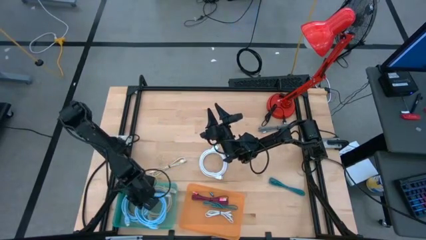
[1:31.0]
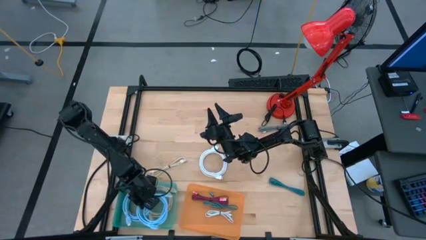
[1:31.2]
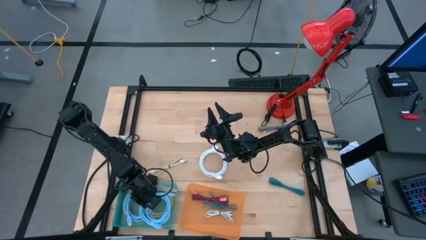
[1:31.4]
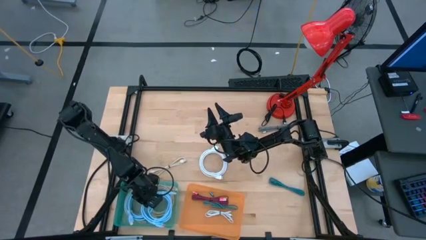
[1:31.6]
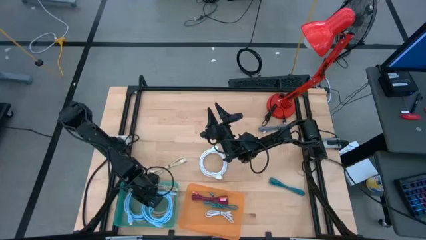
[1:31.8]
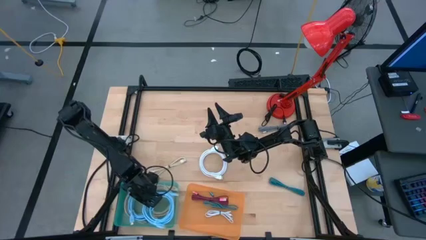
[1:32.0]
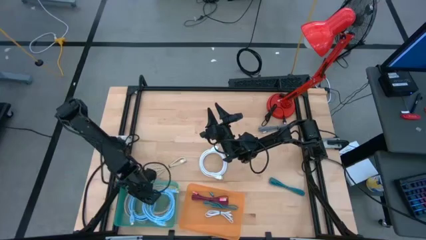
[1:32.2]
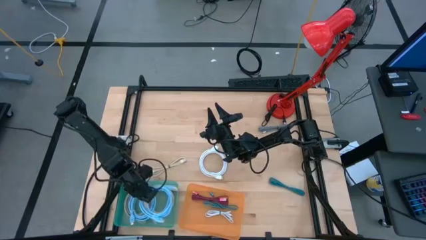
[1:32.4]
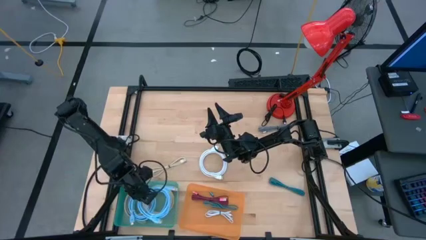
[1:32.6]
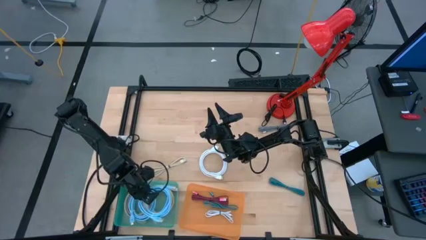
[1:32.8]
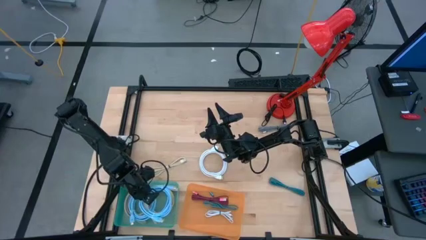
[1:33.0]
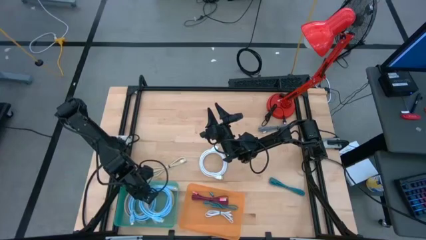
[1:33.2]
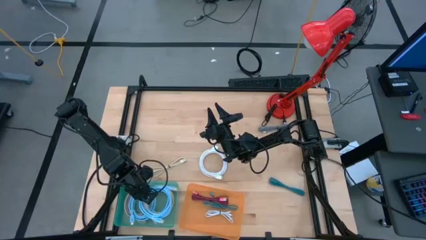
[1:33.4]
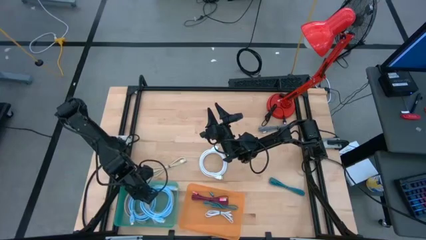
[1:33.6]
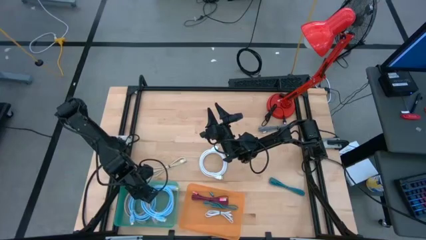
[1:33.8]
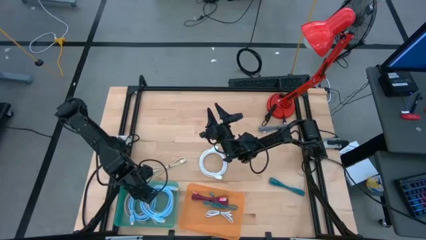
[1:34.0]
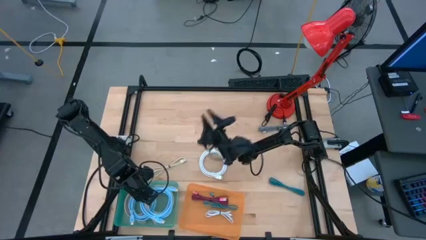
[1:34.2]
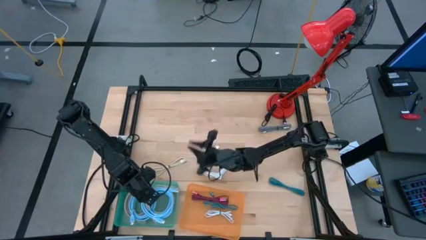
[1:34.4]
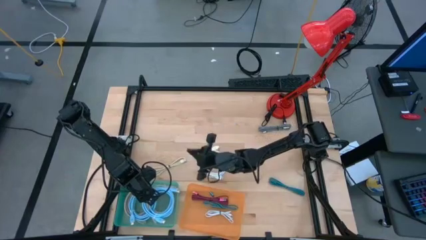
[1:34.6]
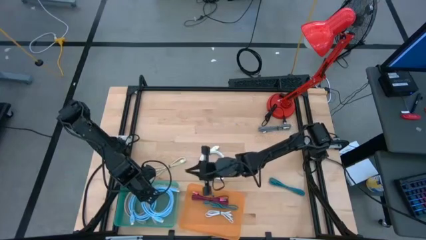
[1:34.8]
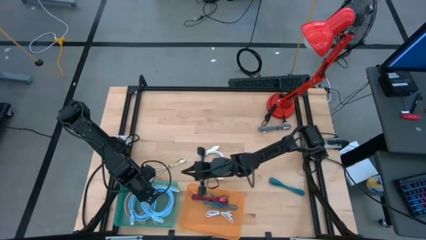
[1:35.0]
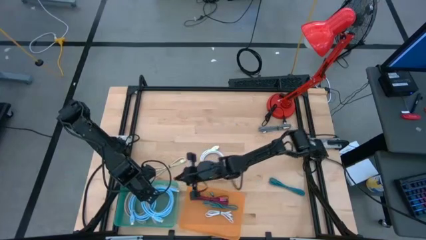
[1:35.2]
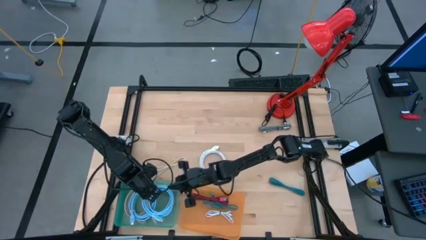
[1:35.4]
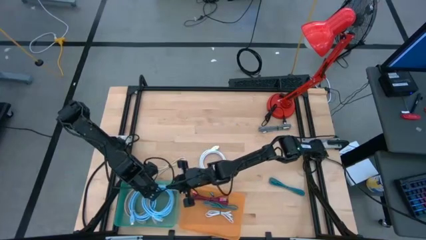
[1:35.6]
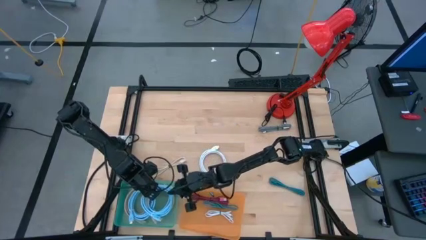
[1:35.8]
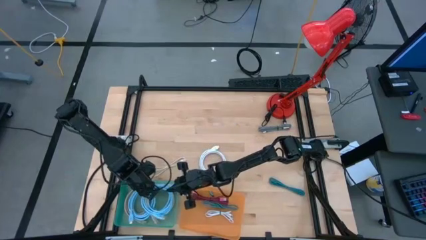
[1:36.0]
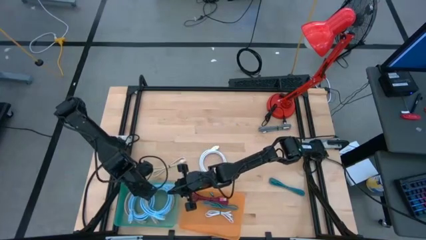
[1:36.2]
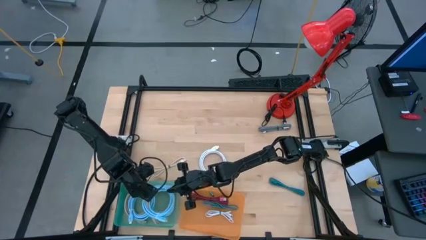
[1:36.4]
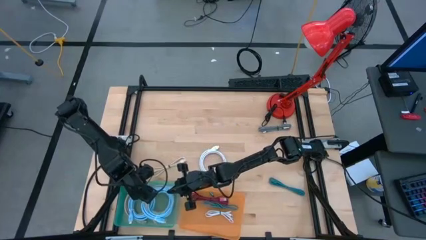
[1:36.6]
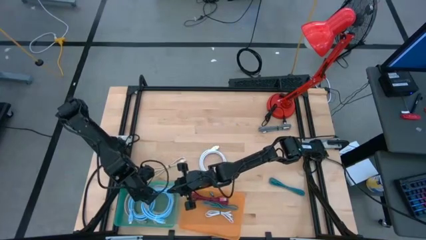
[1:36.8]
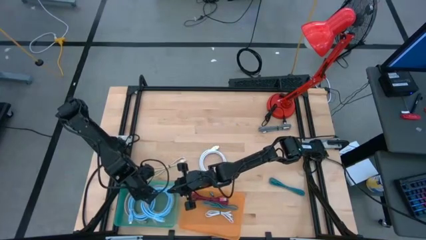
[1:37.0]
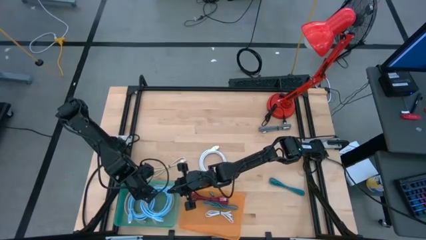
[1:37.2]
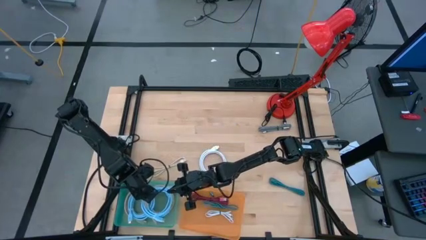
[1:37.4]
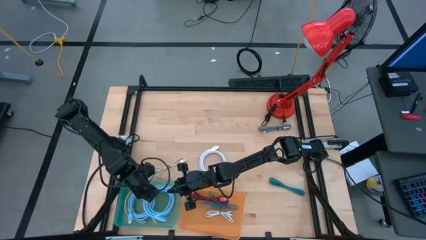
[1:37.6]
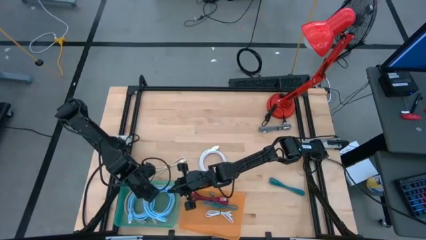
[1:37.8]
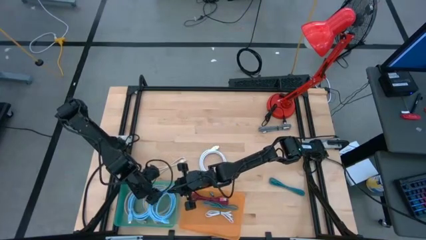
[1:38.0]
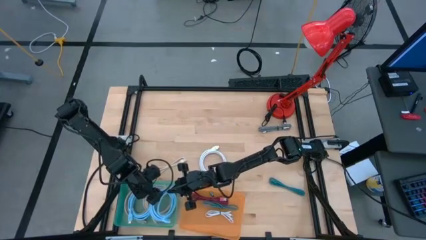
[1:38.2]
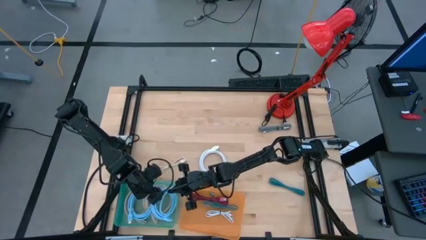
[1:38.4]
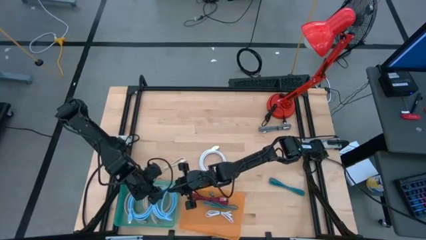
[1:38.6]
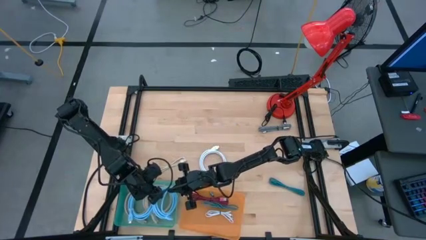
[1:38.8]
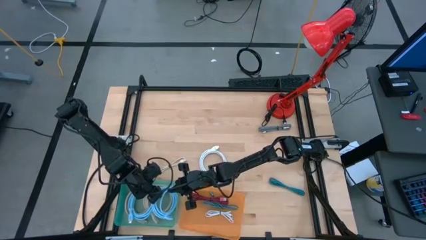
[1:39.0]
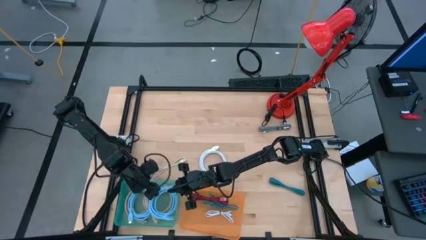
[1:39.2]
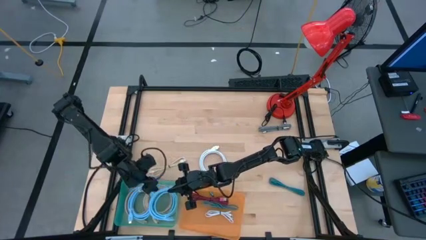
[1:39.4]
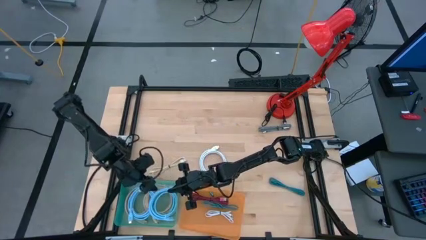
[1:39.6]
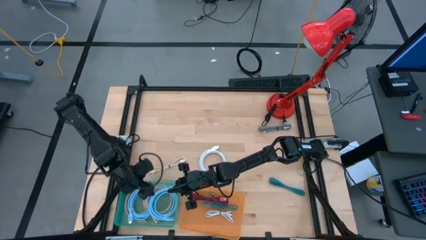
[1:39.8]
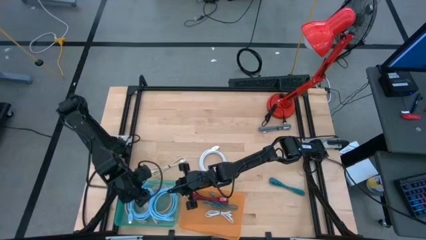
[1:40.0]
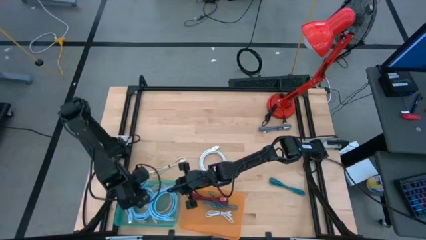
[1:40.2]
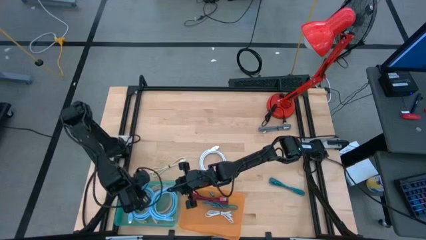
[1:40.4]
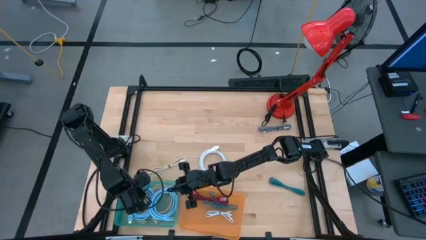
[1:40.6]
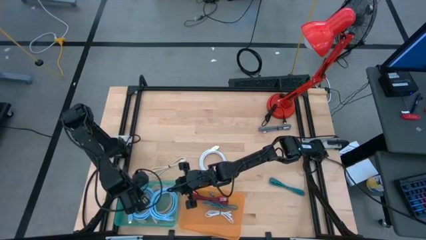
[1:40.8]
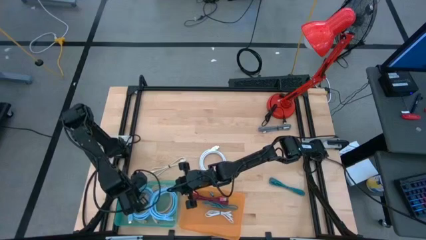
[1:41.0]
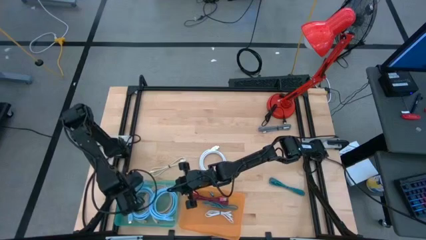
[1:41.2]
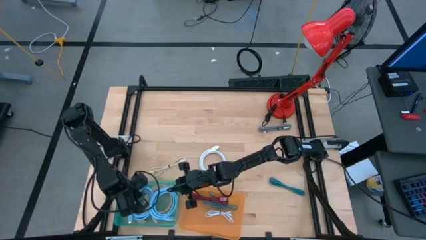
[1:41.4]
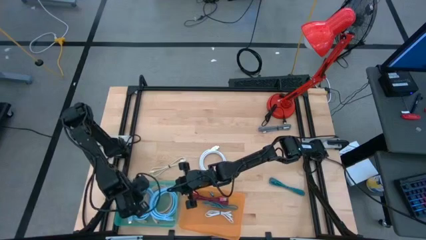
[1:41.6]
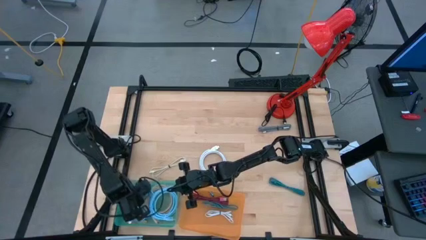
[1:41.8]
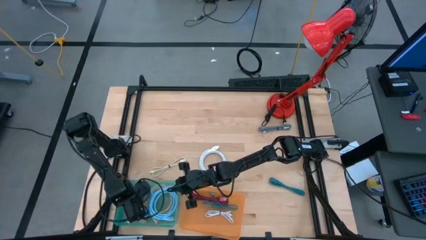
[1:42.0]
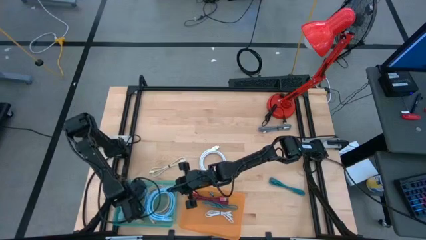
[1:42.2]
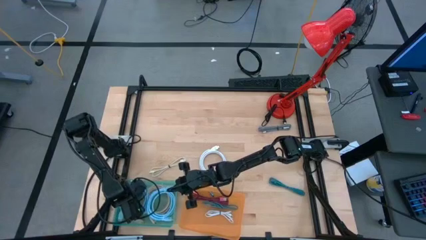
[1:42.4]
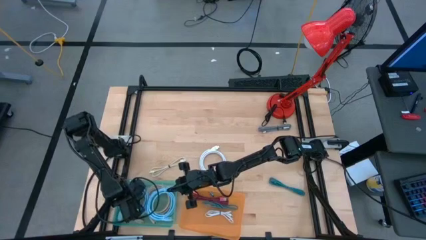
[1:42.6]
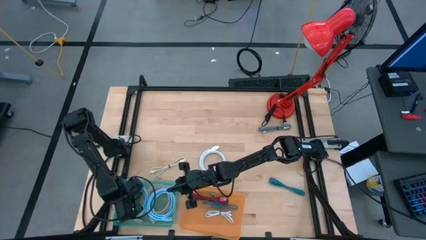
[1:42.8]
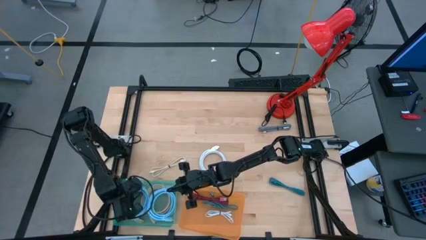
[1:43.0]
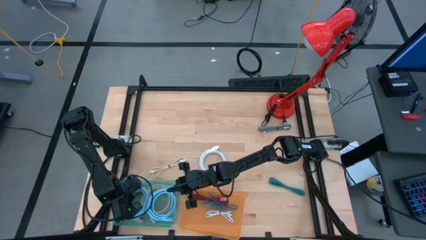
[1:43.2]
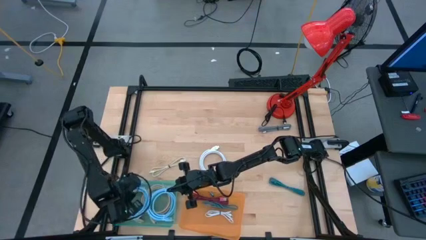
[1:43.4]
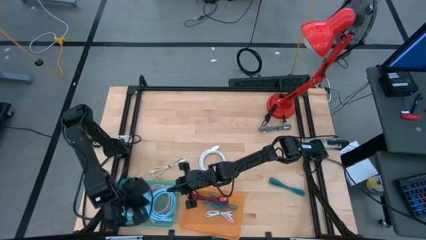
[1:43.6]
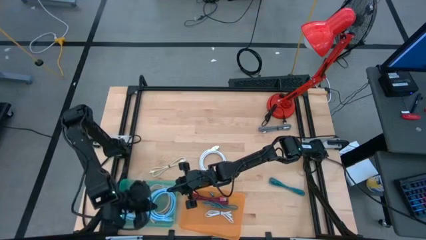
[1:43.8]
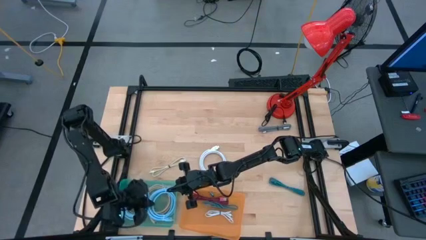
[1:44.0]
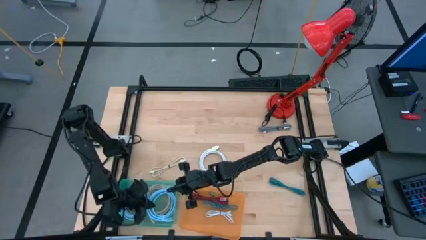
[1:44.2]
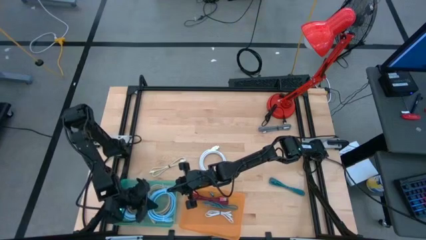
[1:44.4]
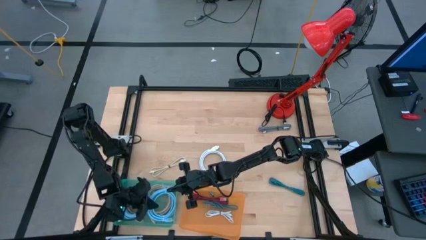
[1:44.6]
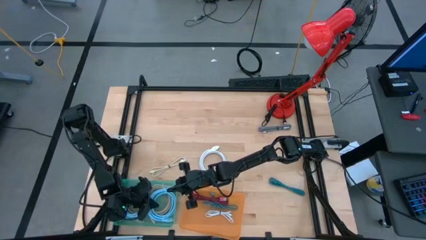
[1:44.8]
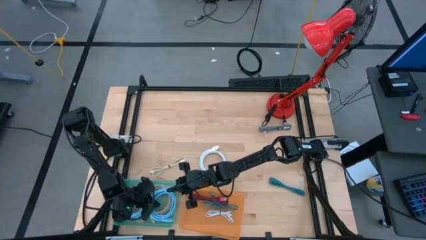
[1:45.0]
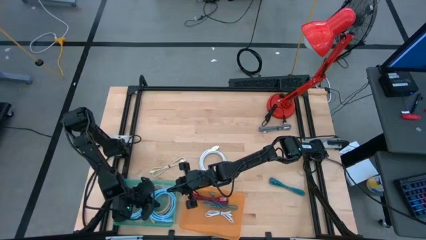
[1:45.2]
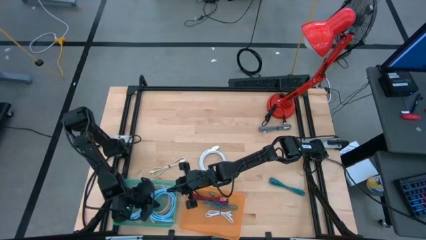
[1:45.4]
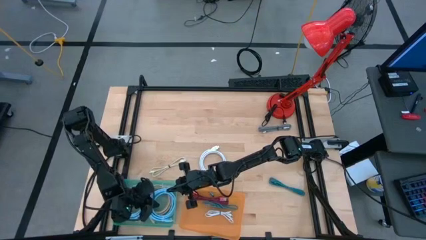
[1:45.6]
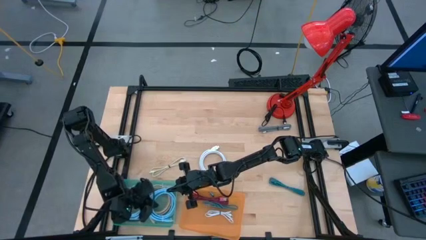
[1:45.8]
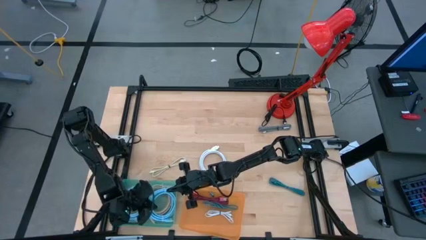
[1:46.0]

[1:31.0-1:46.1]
Task: Pick & Place USB Port
Put the blue HDMI cable into the green bin

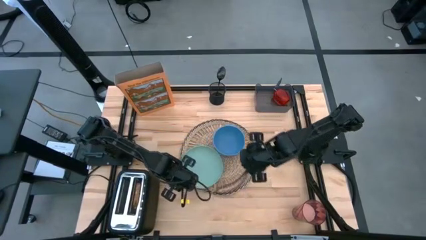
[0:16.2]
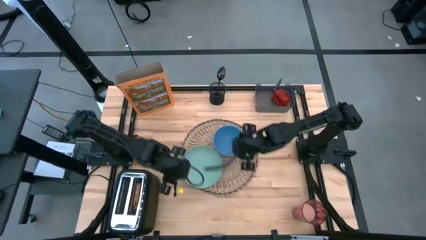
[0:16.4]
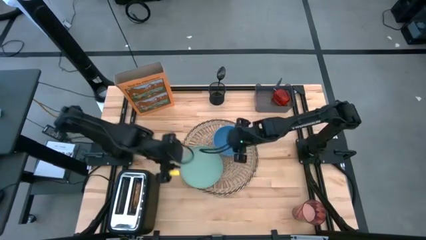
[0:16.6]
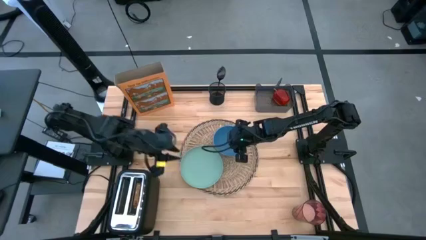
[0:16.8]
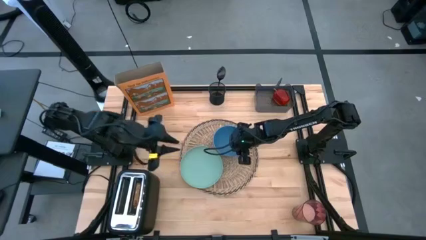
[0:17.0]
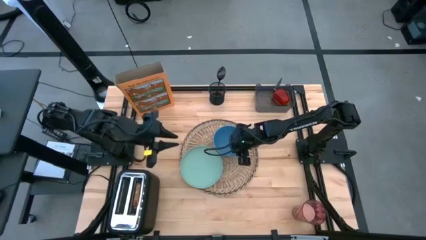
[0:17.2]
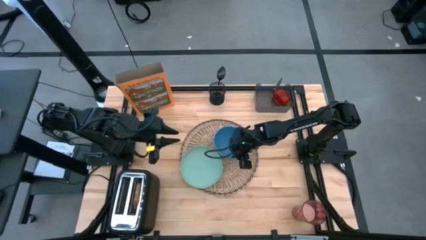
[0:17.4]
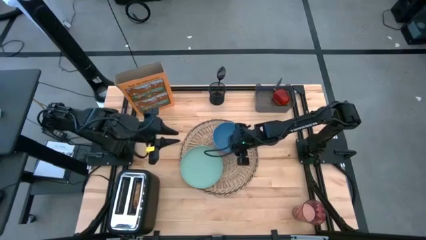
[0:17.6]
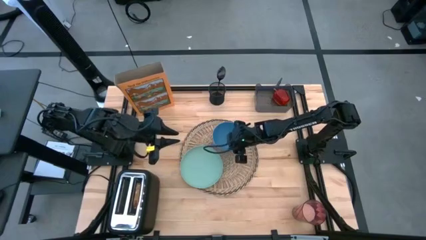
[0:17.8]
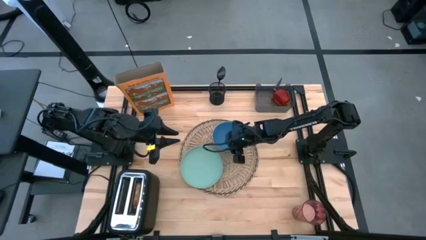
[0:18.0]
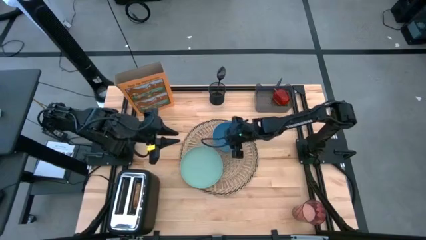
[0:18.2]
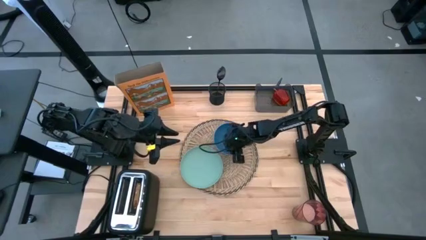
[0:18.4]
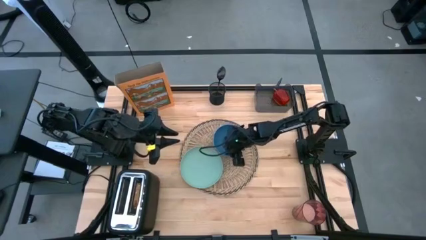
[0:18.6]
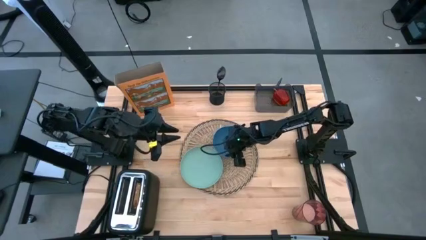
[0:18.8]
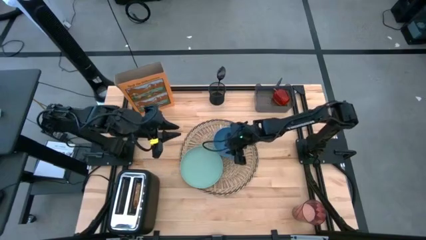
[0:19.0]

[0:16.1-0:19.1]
Task: Arrange a breakfast setting
Adjust the blue bowl on the brown table mat
